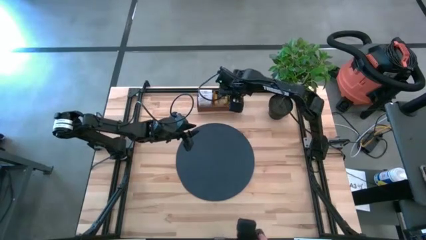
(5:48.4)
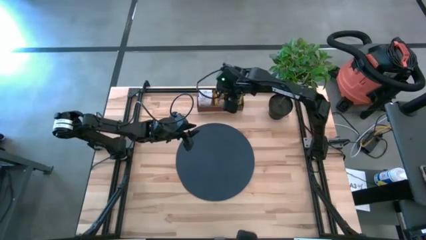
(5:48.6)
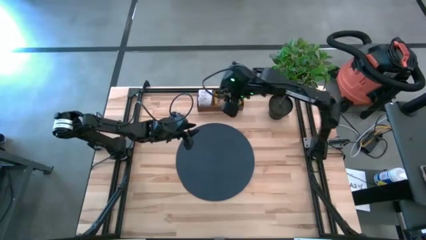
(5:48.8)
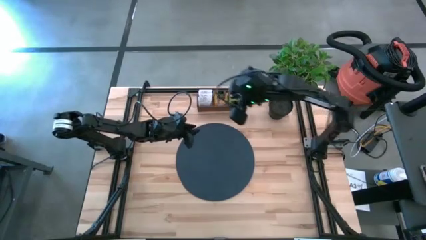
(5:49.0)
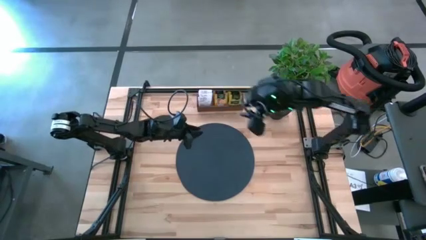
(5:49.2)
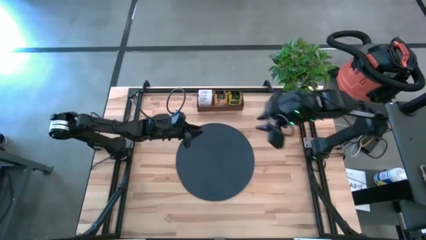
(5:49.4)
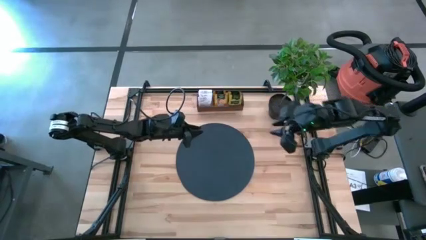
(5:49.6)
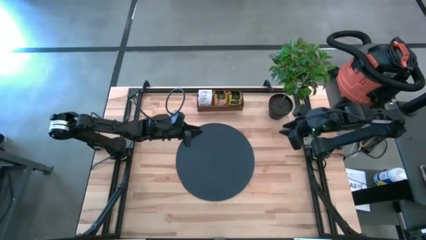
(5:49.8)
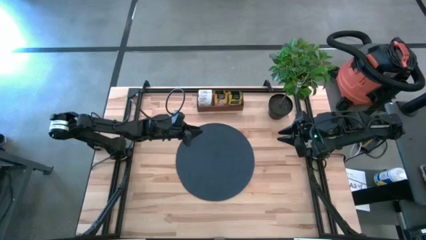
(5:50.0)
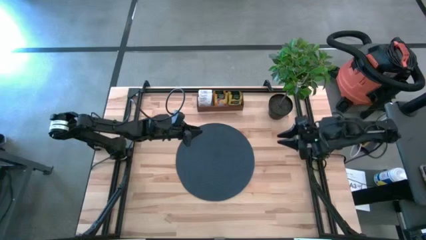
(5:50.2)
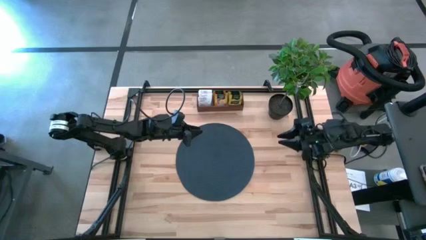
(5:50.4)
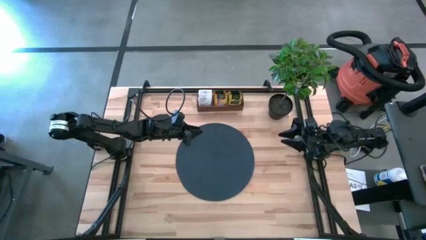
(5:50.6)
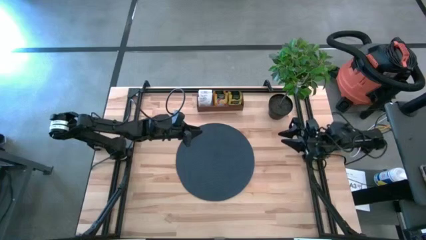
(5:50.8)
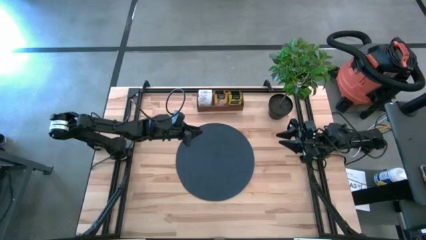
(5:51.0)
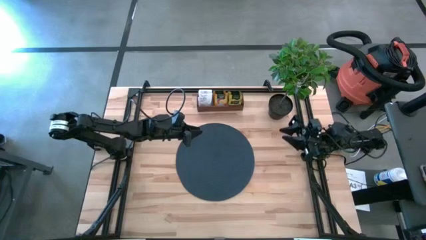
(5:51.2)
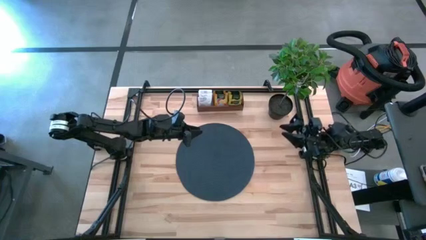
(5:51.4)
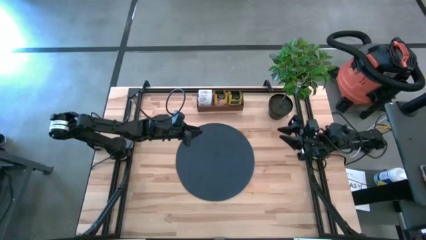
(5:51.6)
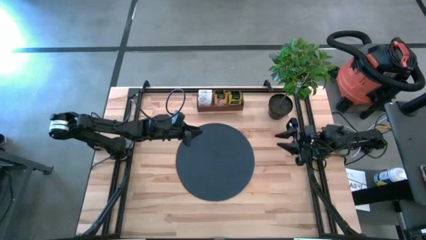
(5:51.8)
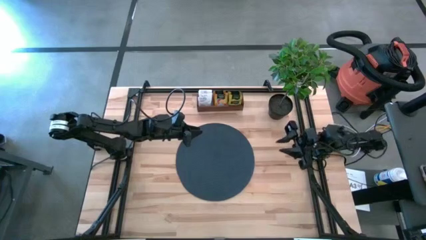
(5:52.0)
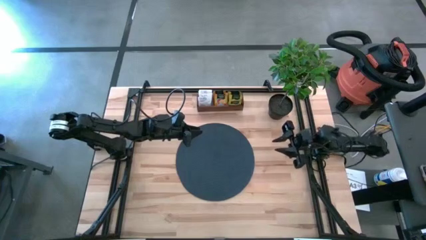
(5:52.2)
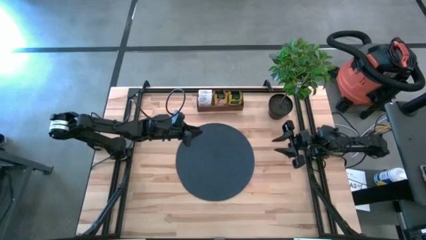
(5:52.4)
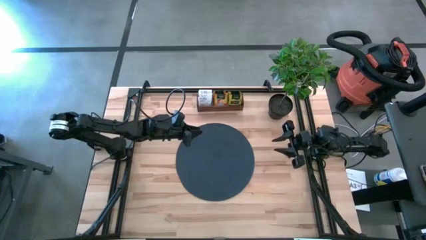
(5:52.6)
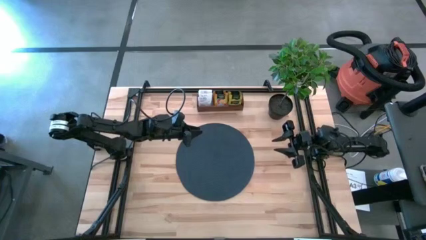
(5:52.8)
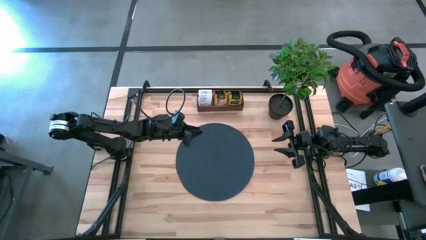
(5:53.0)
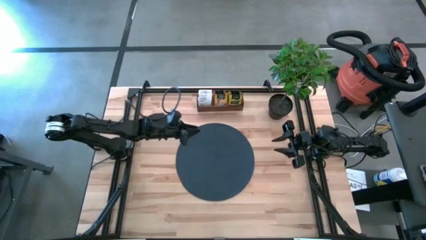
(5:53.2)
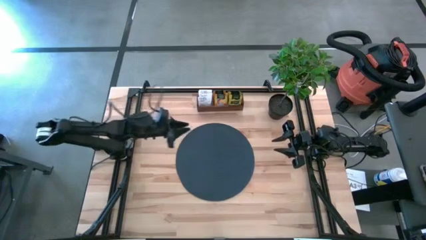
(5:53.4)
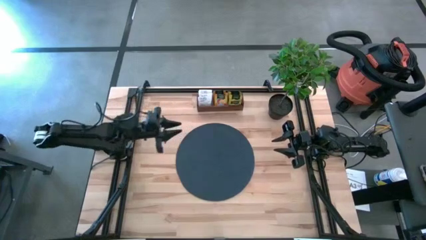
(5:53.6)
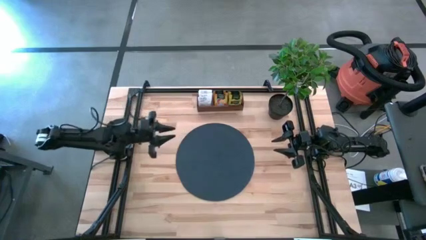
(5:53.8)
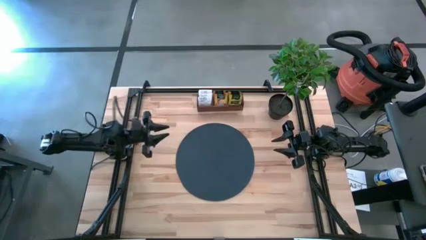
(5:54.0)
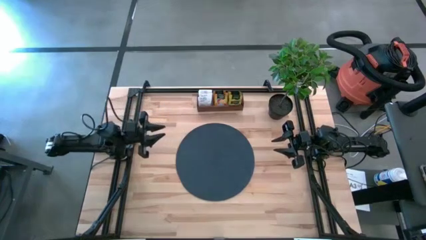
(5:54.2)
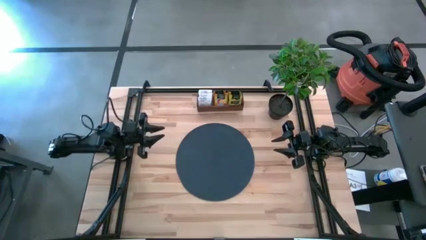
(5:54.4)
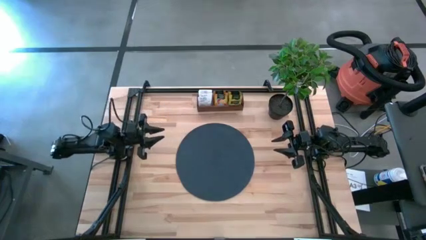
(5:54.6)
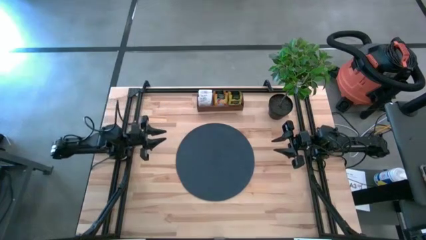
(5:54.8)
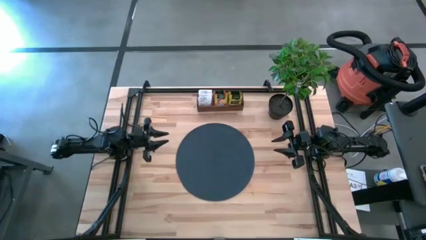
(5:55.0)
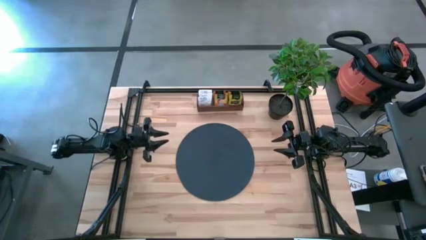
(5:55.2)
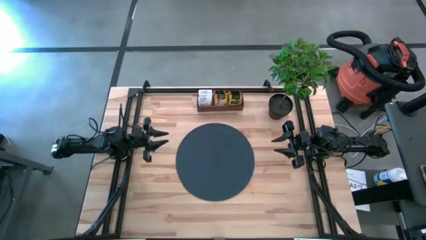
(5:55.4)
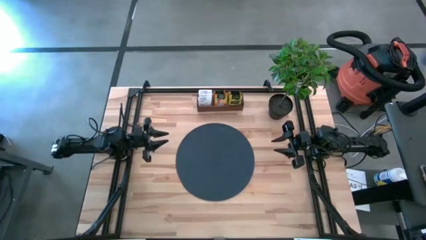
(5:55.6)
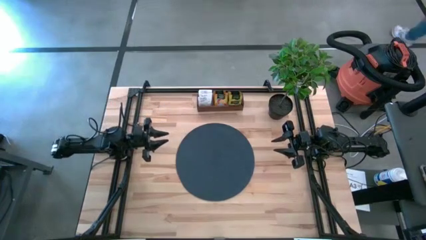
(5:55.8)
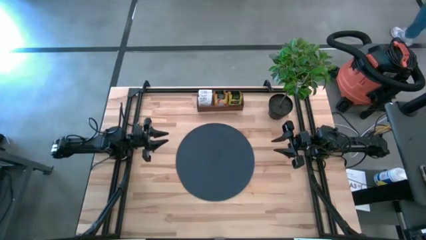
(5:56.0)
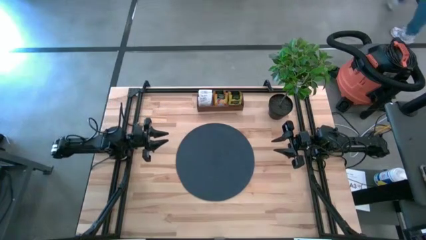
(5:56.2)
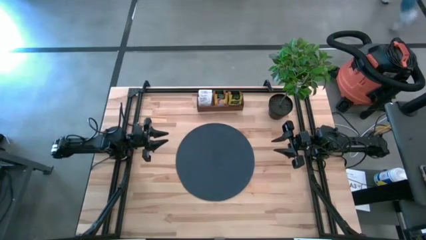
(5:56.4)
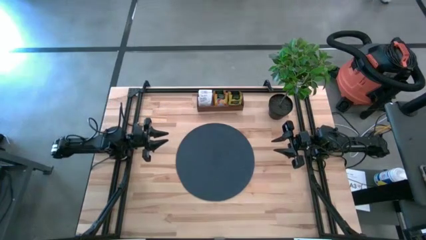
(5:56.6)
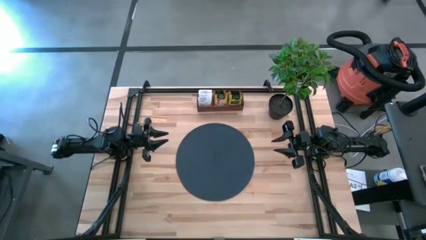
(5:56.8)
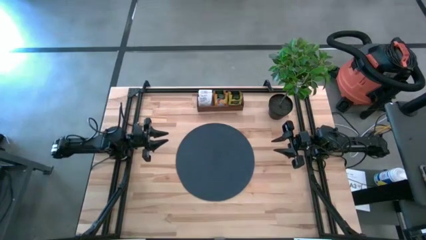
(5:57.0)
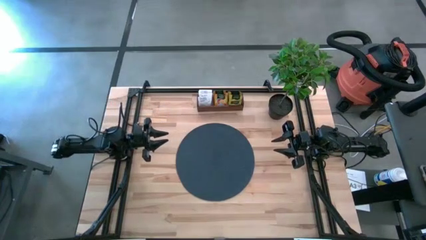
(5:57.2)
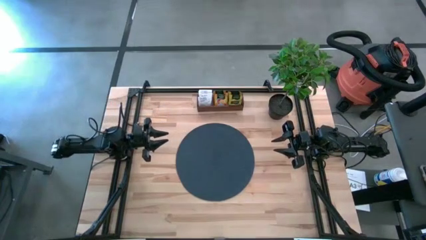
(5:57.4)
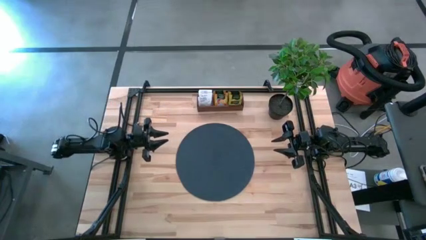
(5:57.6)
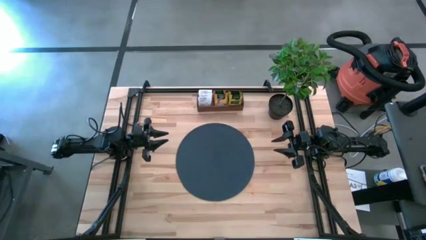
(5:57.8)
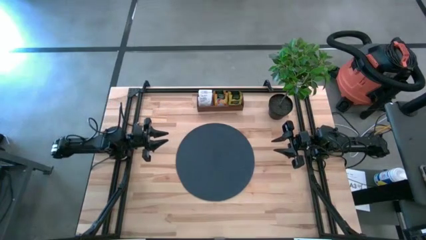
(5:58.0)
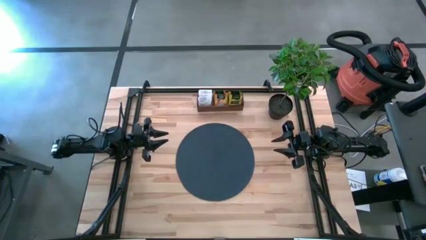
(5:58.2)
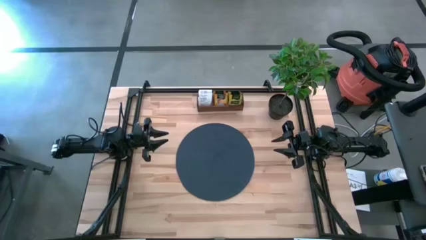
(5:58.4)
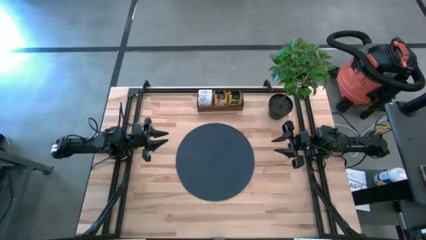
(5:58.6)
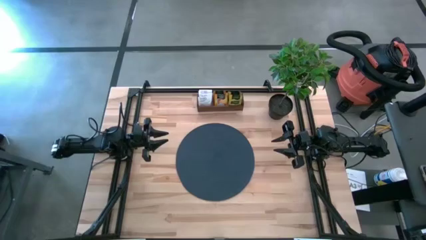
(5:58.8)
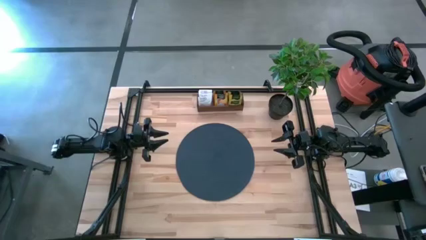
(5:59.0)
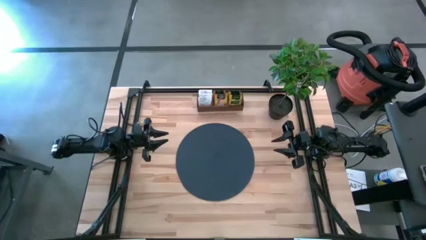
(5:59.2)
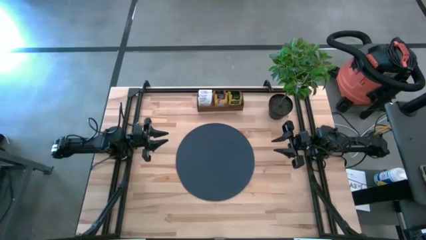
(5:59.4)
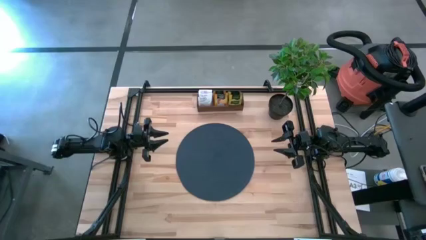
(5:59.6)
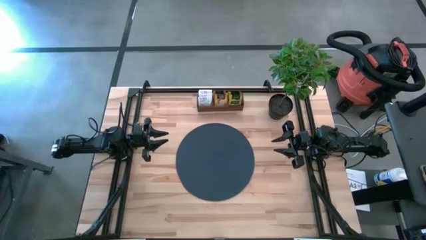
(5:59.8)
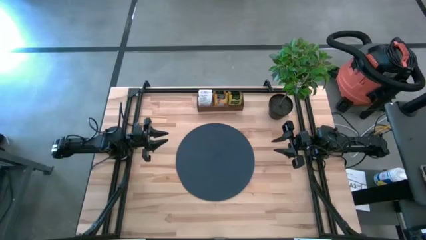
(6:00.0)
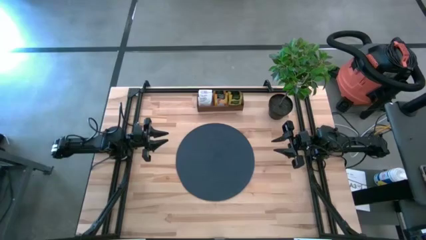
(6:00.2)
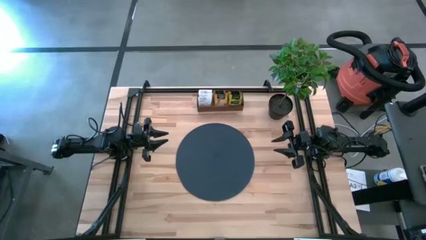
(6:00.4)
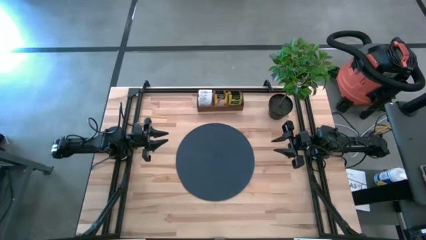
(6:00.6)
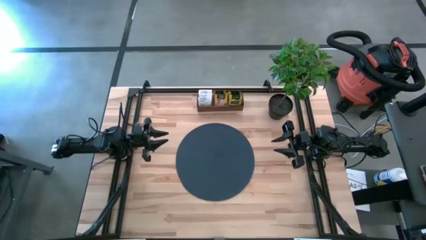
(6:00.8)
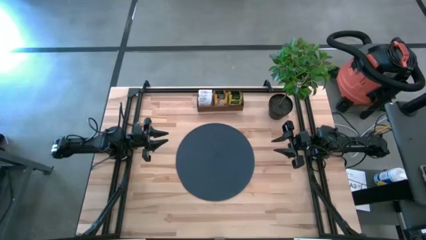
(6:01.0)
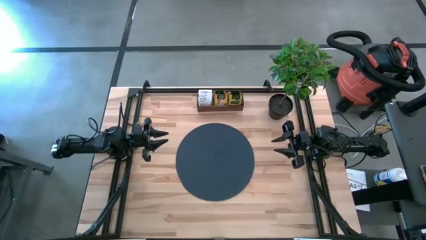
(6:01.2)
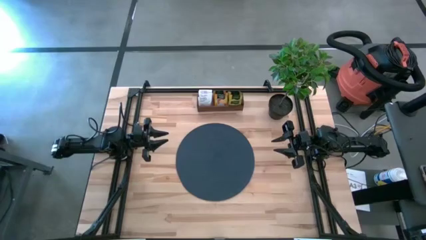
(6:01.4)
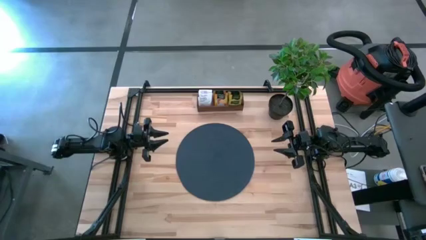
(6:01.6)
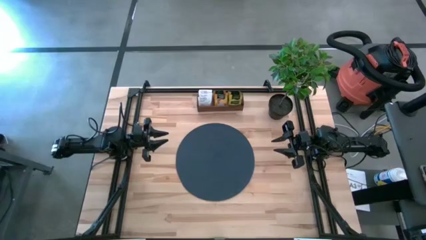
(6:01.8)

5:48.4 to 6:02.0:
Task: Pick & Place Tea
Return to Home Position

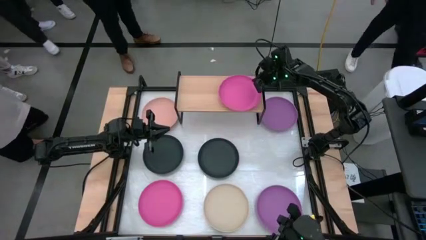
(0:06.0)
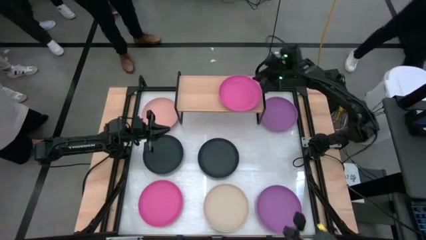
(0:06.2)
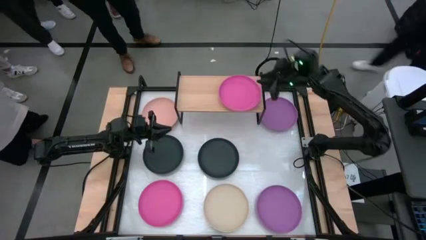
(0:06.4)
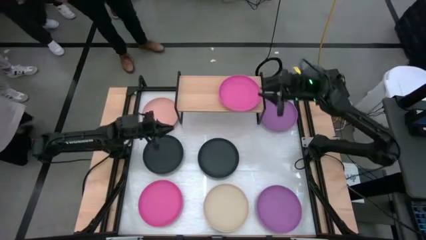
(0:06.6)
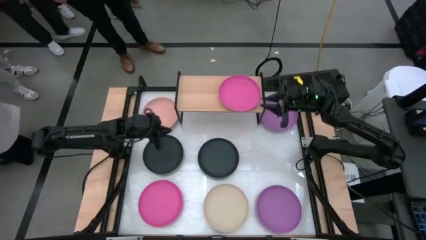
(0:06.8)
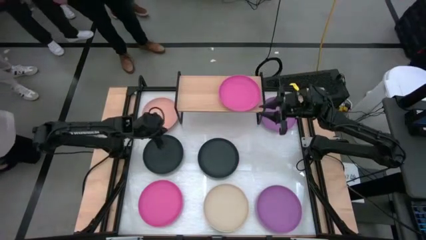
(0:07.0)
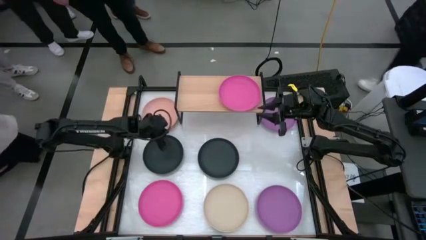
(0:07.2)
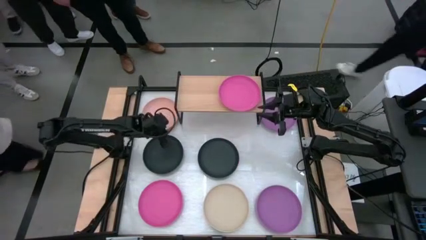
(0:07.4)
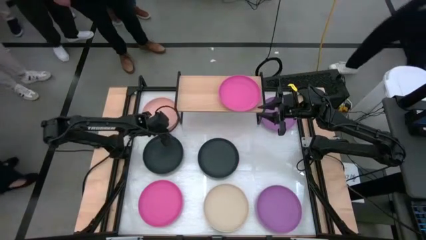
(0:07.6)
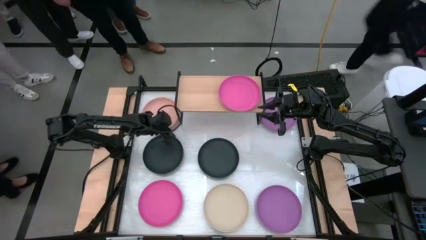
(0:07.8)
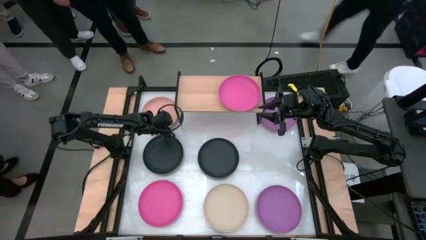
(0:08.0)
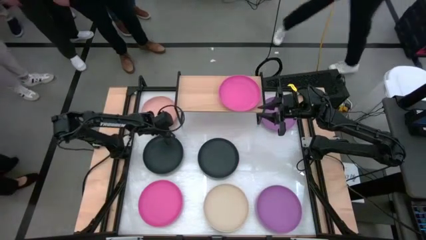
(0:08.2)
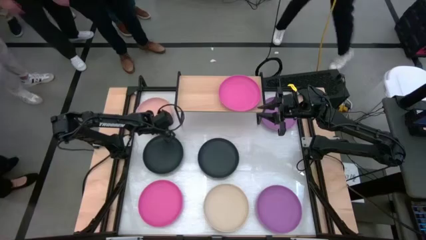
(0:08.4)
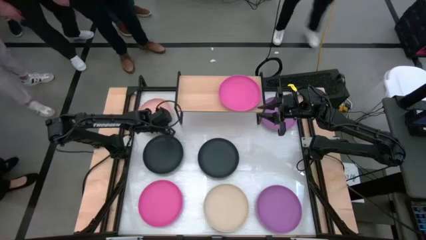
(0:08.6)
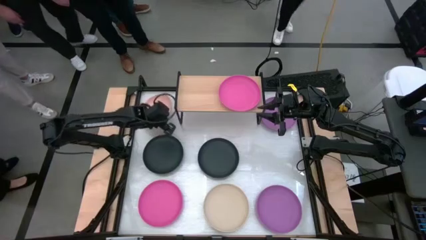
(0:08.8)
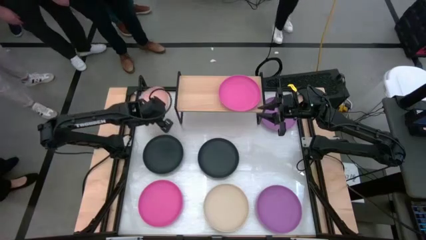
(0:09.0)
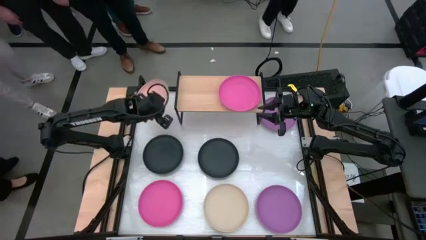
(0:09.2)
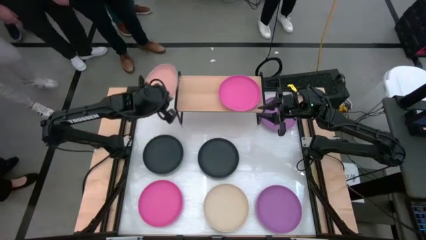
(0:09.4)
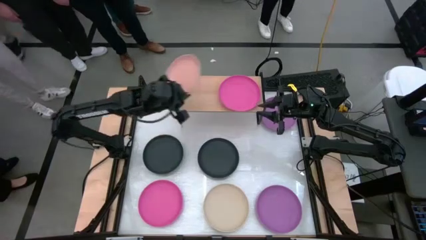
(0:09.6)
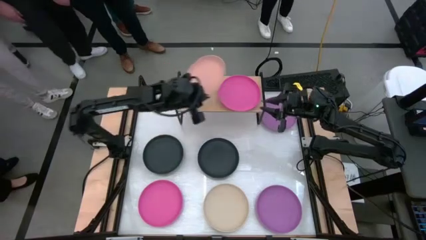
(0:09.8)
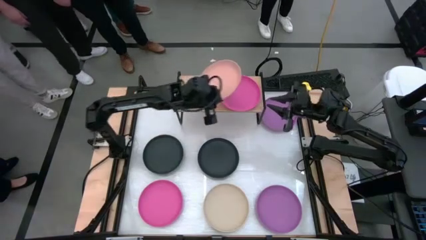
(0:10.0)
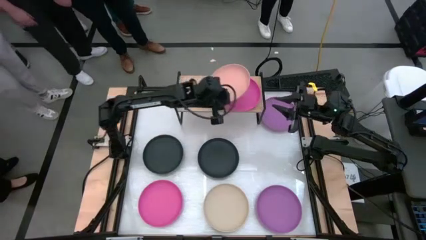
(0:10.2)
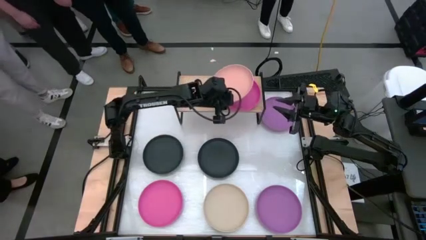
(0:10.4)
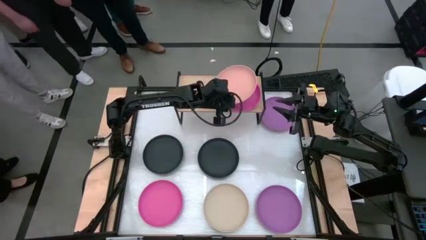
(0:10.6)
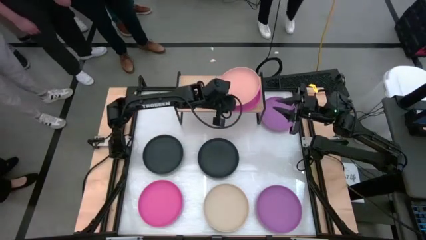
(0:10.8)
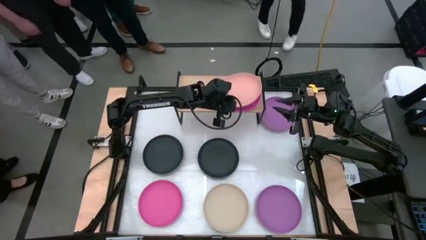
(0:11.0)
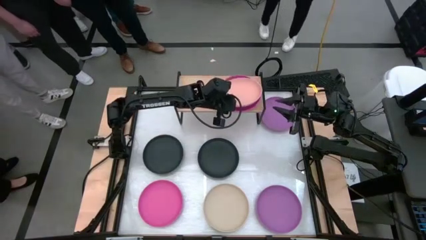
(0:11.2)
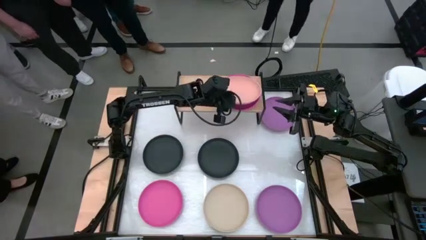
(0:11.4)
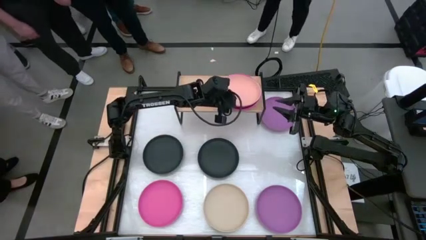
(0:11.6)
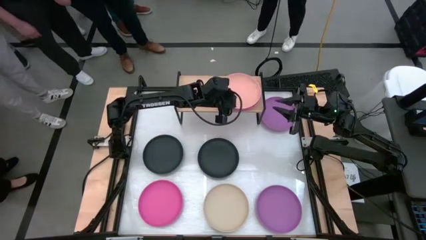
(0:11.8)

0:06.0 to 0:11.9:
Task: Place and stack plates onto a shelf
Stack the peach plate on top of the pink plate on the shelf
